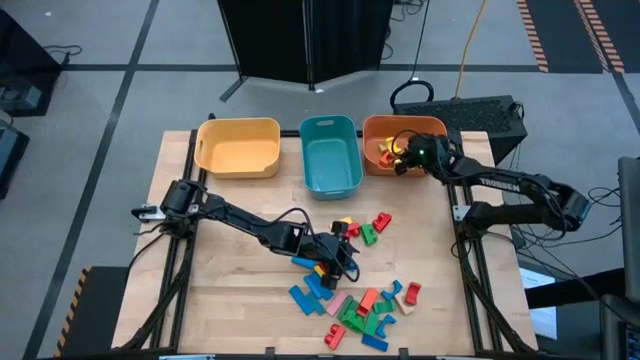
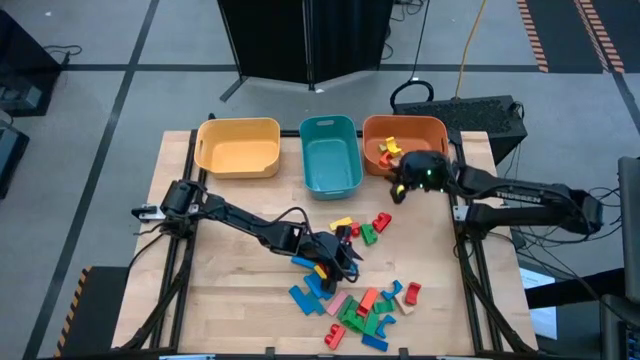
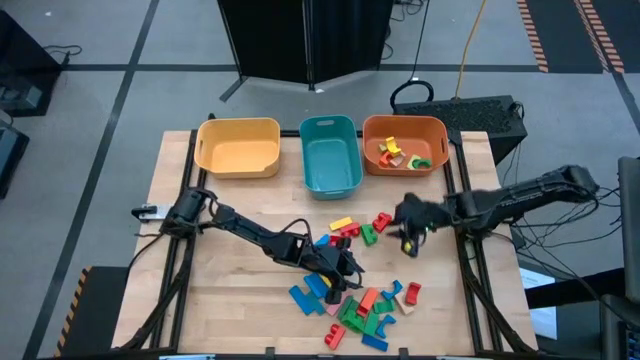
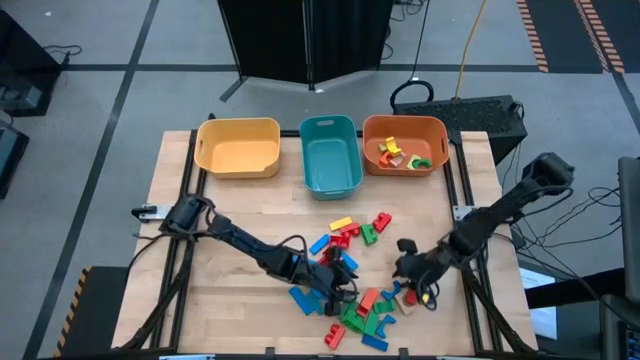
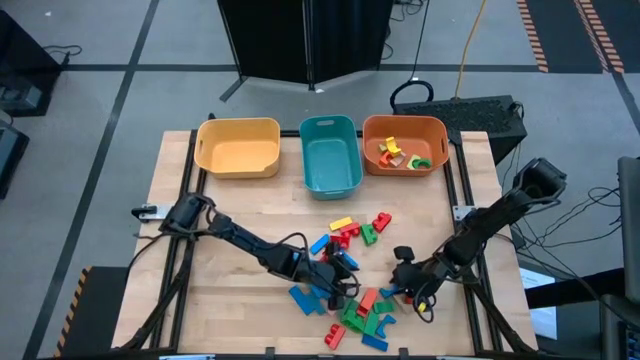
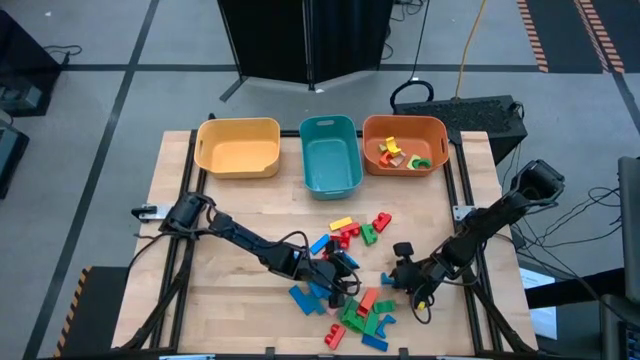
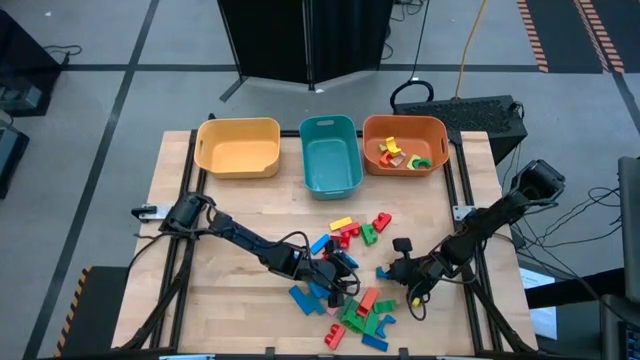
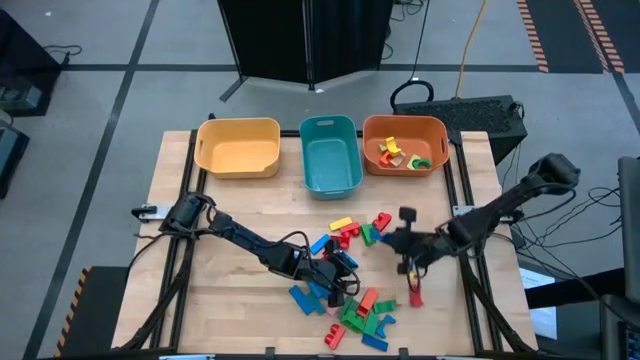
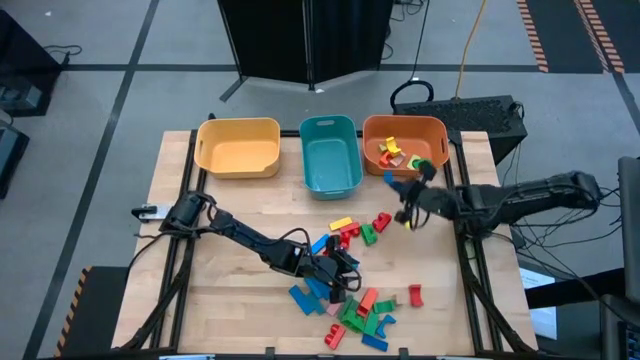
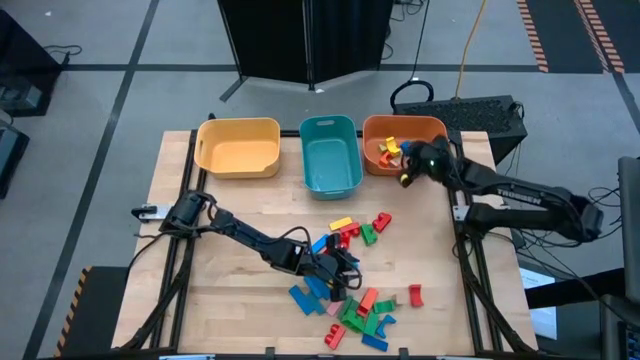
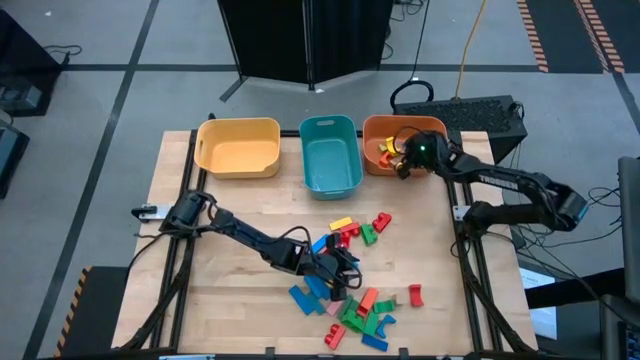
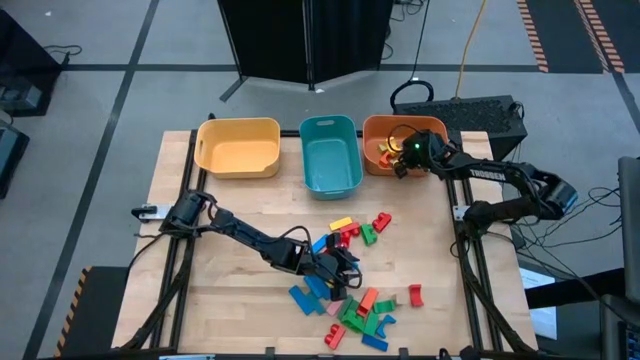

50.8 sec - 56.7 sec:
Task: Sort blocks by size
Put the blue arch block into the orange bin

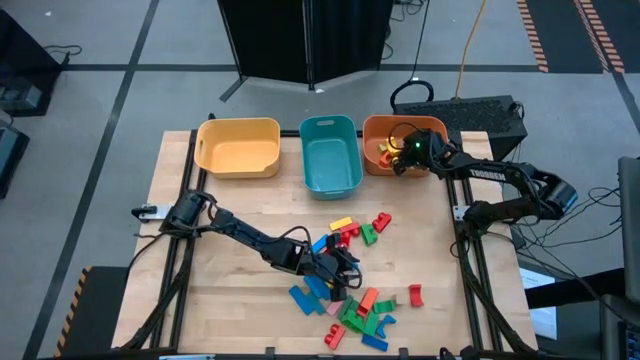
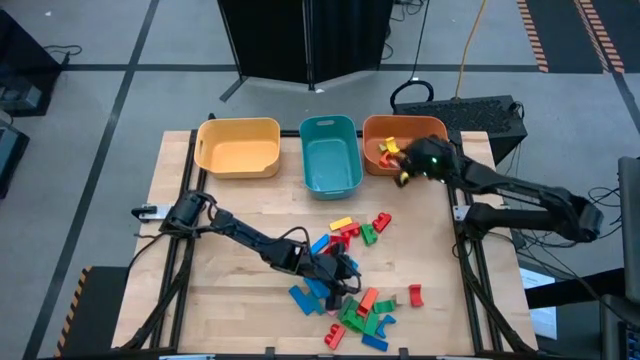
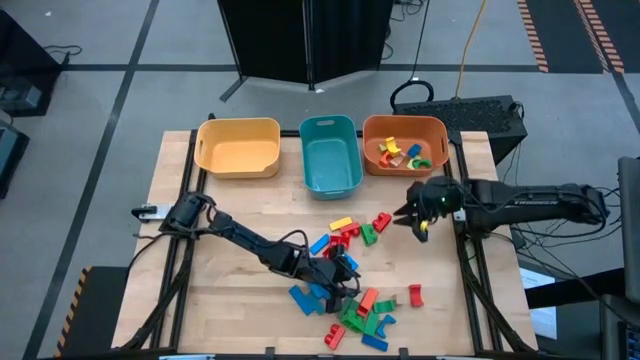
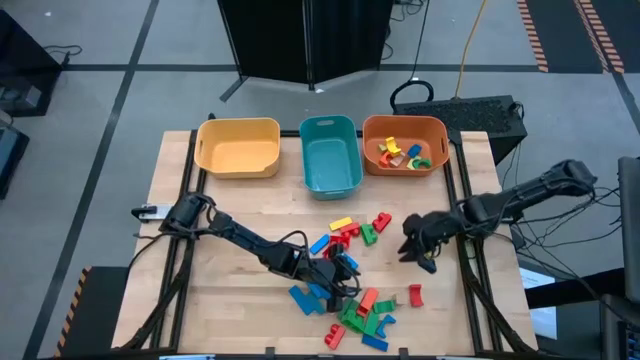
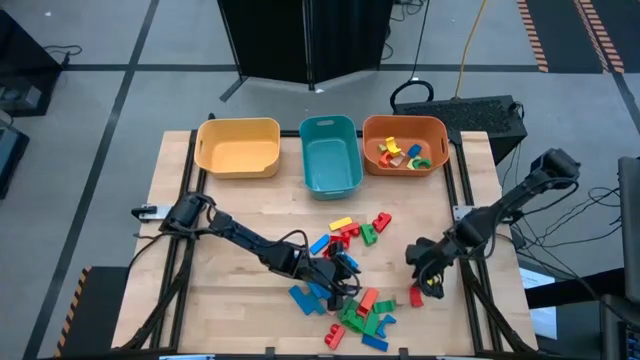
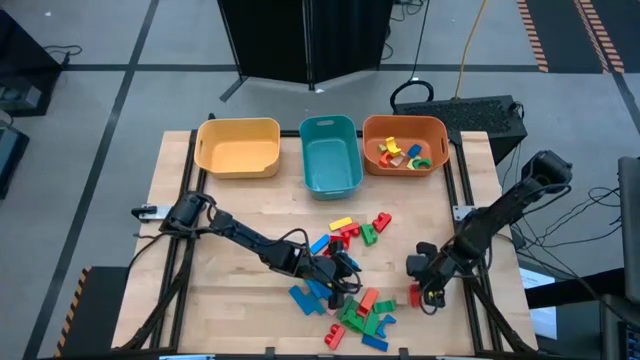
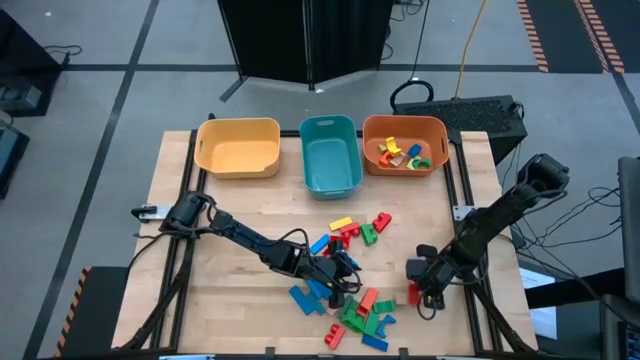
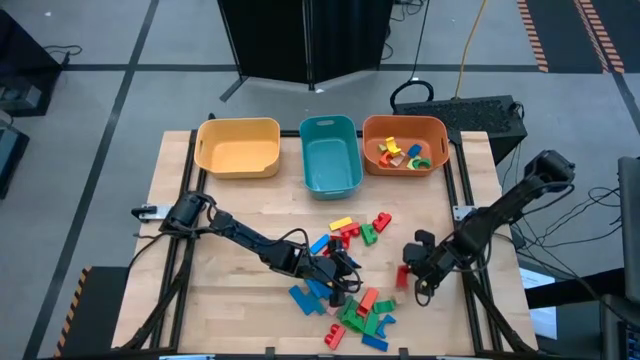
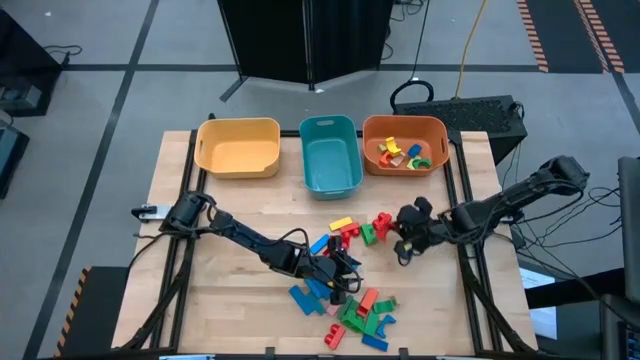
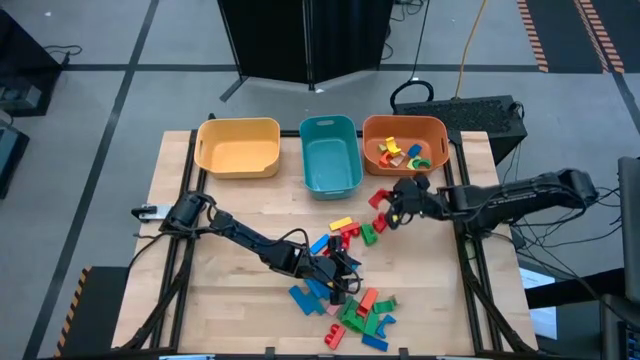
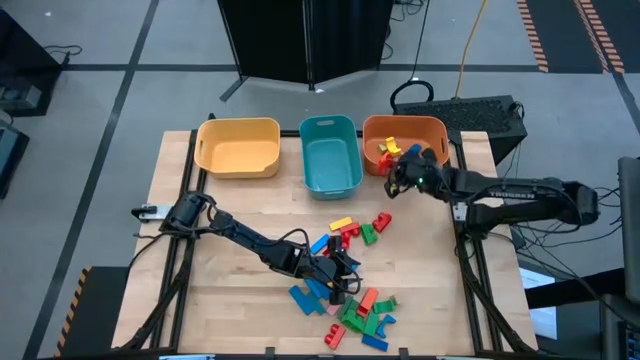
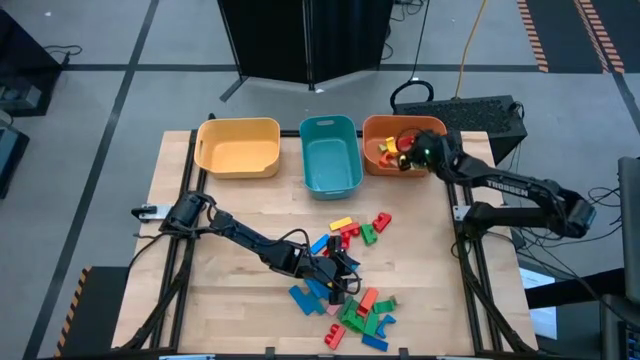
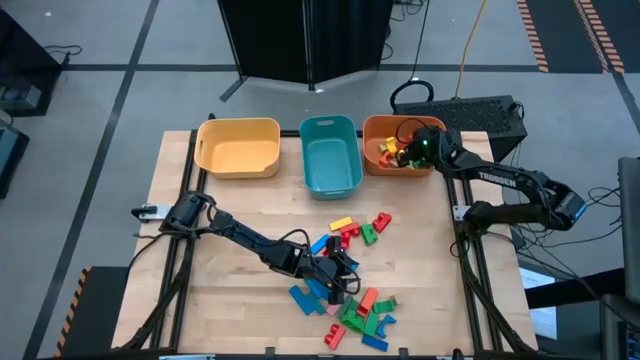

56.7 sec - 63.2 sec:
Put the red arch block into the orange bin

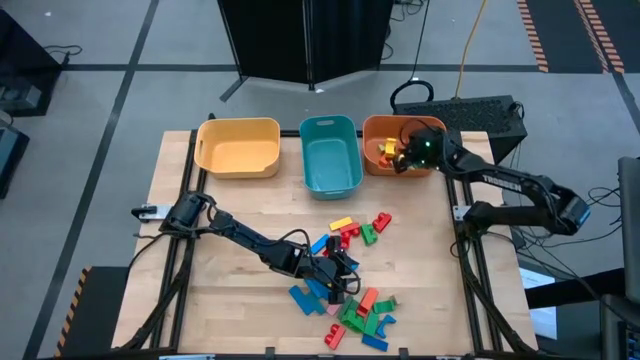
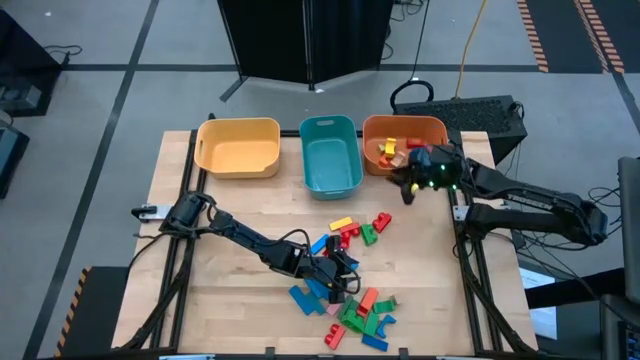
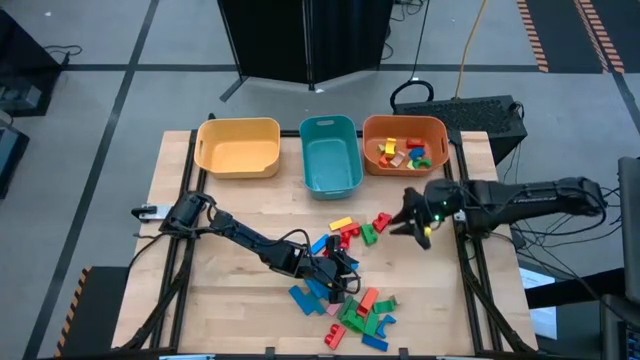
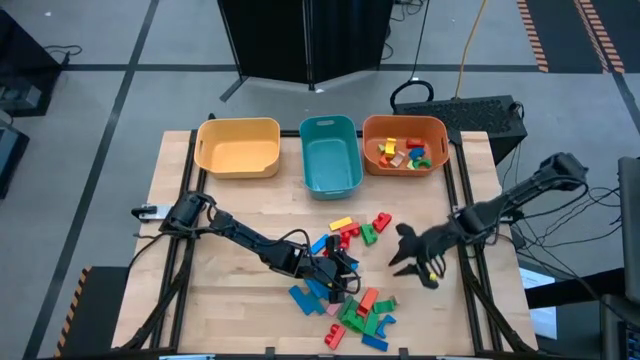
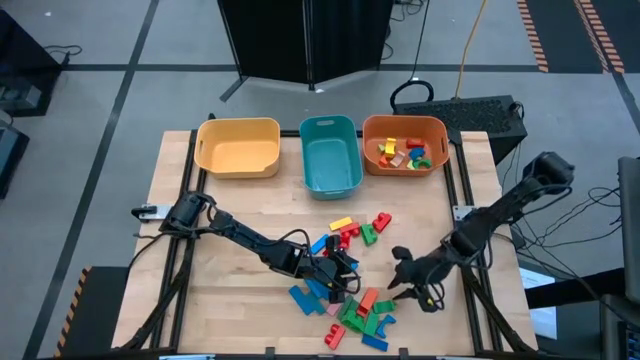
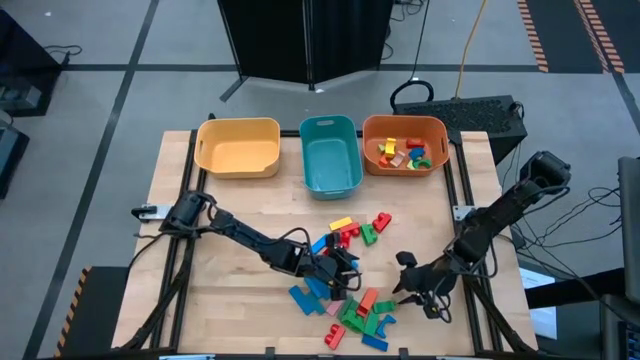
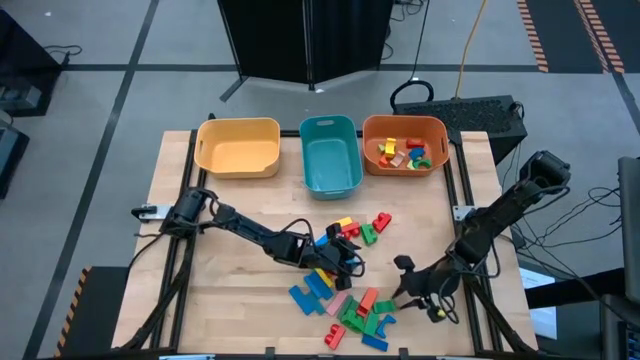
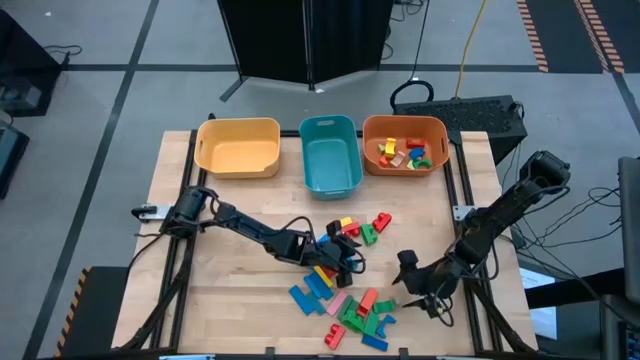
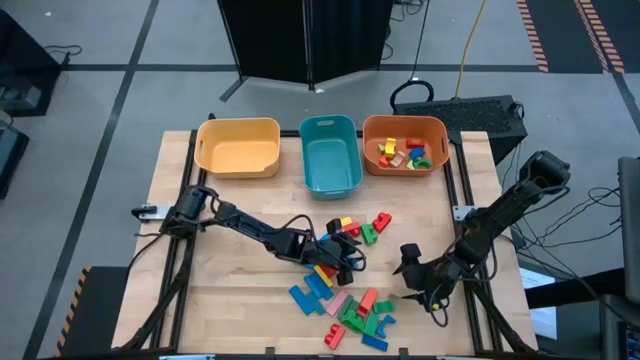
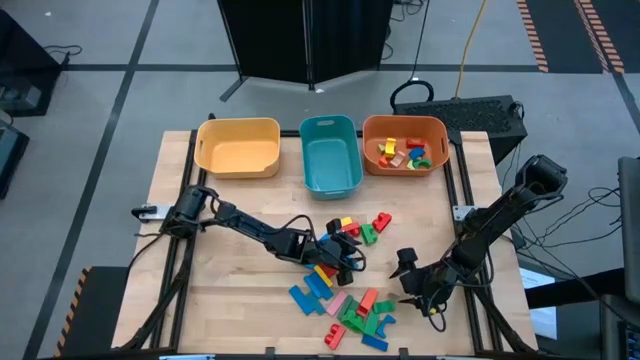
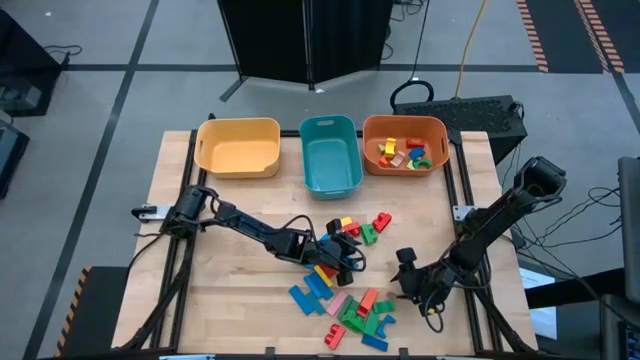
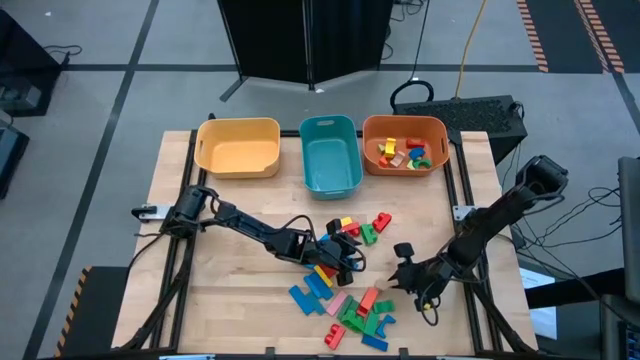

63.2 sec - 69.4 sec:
Put the light brown arch block into the orange bin

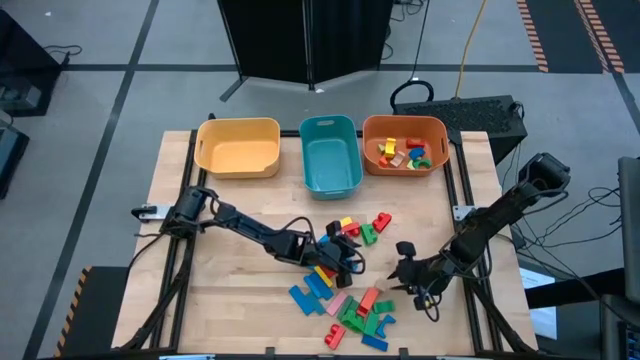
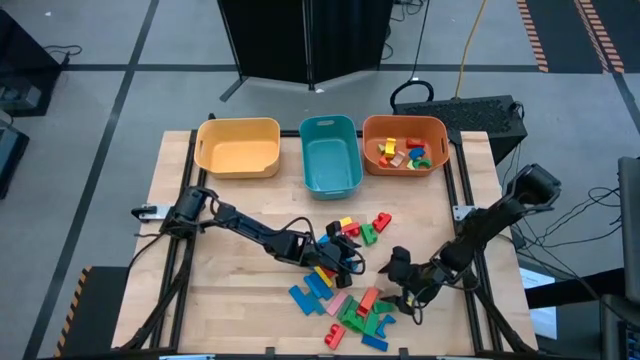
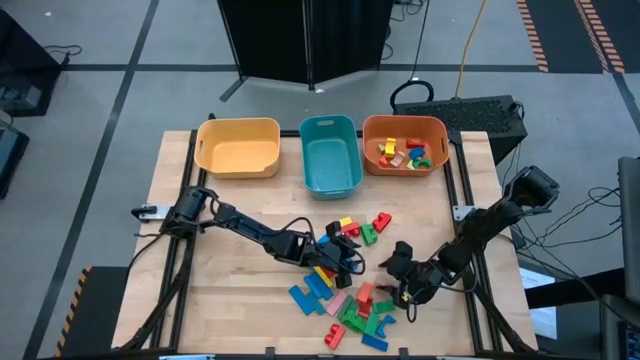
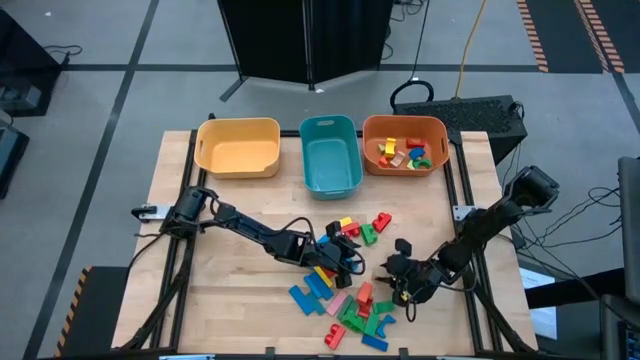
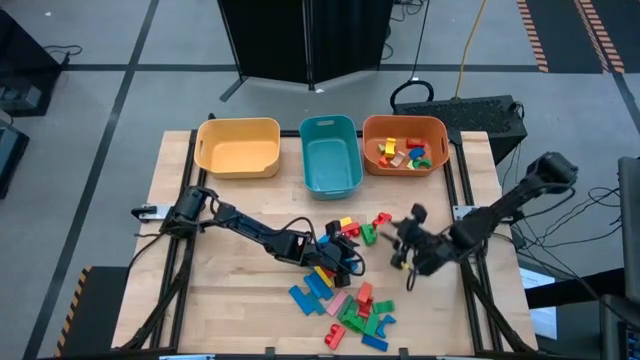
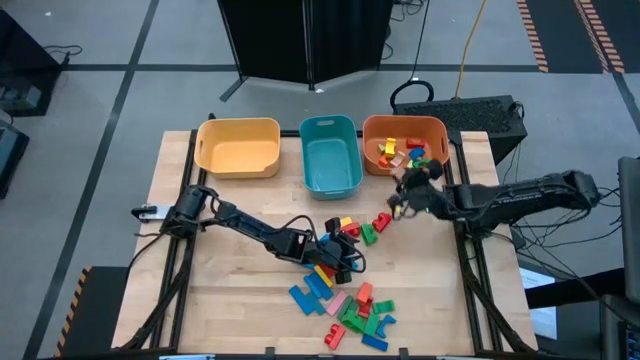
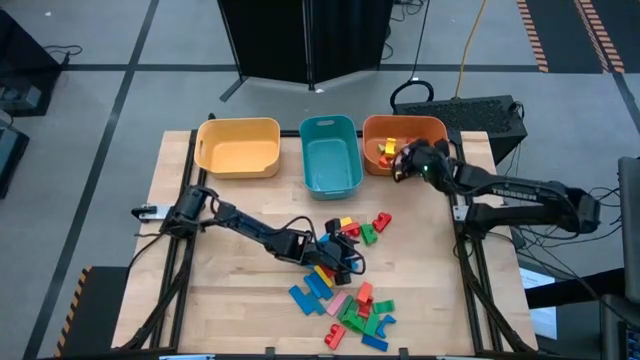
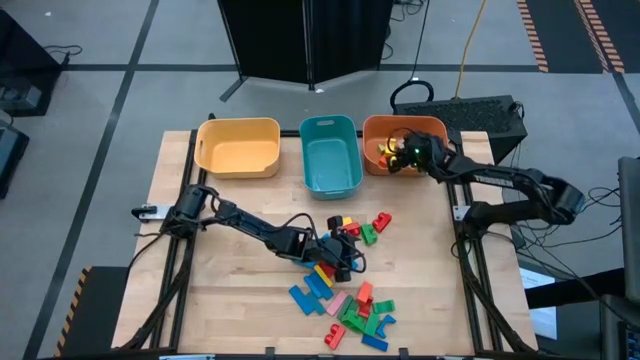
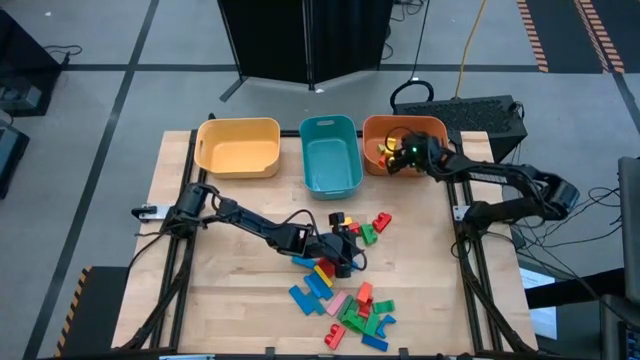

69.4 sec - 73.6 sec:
Put the light brown arch block into the orange bin
